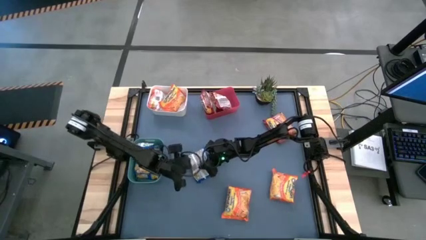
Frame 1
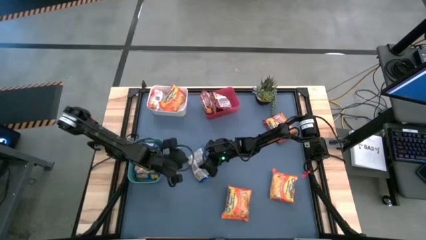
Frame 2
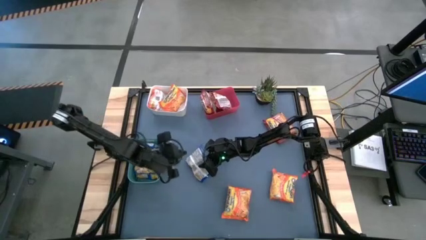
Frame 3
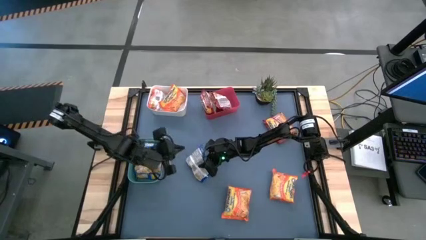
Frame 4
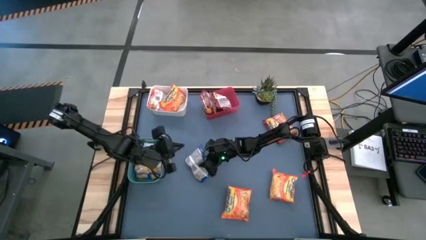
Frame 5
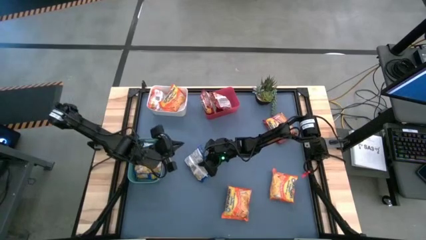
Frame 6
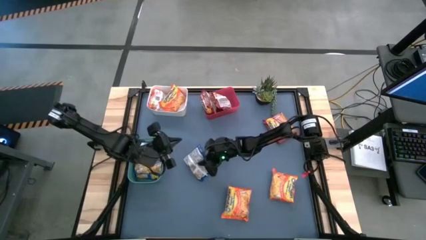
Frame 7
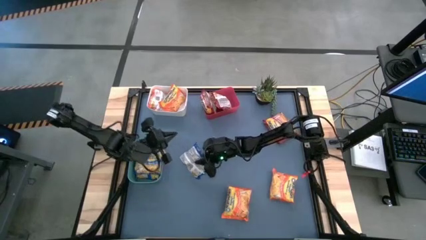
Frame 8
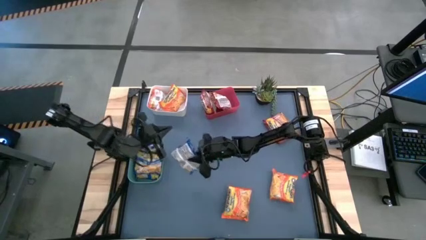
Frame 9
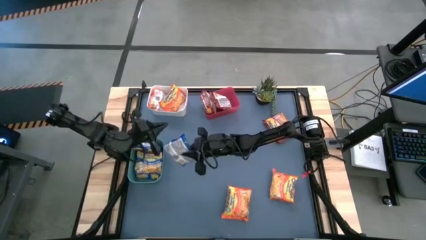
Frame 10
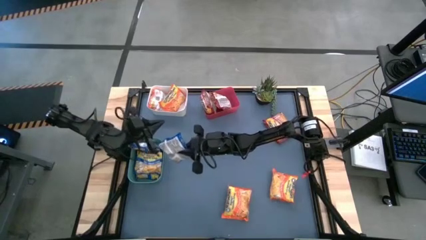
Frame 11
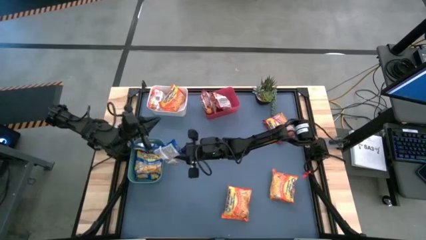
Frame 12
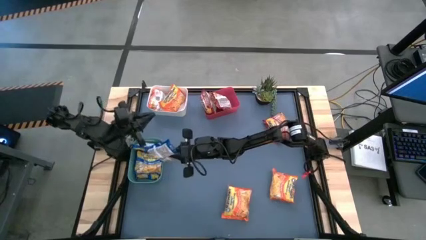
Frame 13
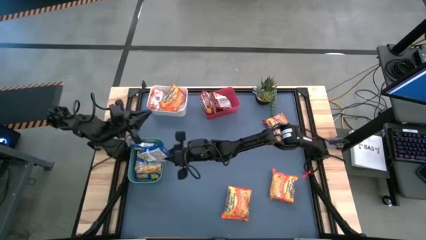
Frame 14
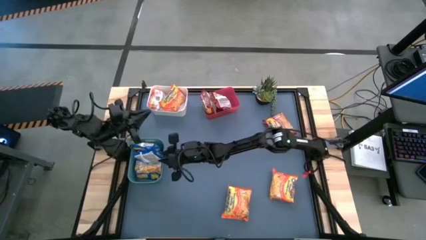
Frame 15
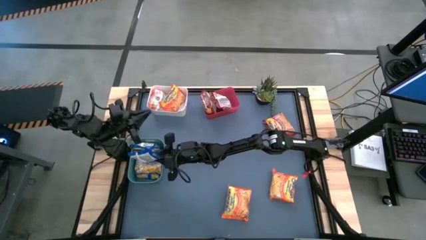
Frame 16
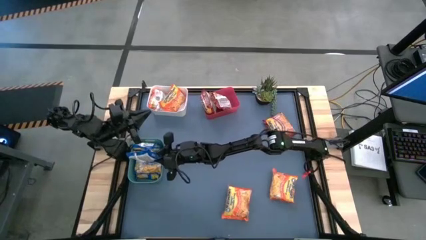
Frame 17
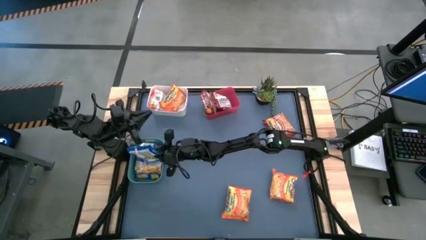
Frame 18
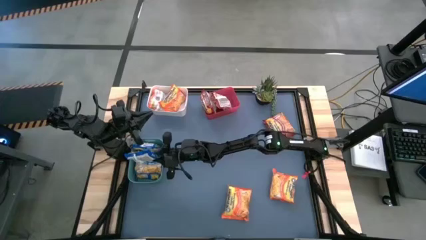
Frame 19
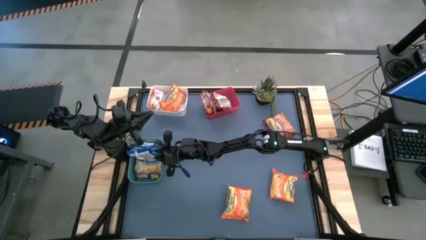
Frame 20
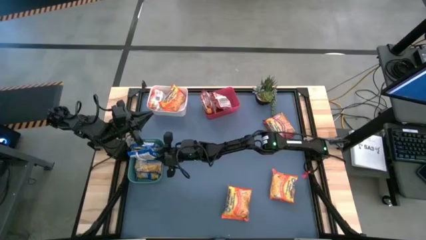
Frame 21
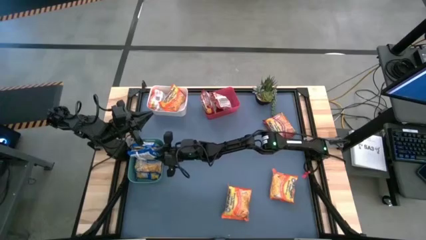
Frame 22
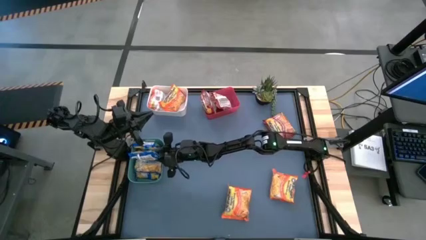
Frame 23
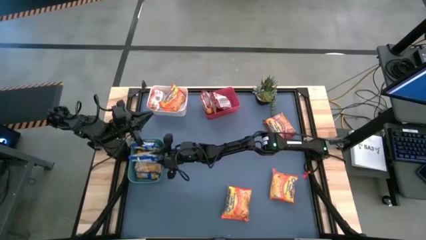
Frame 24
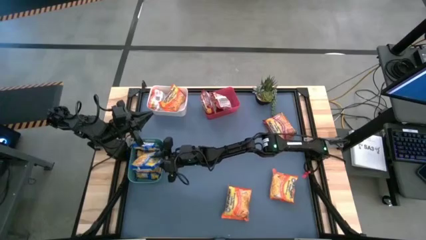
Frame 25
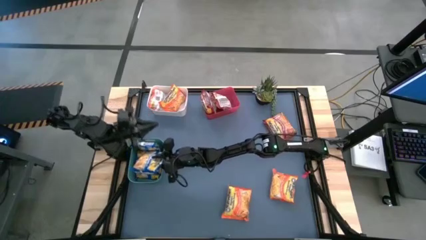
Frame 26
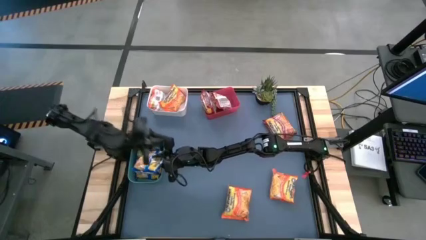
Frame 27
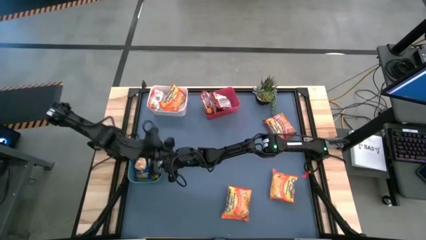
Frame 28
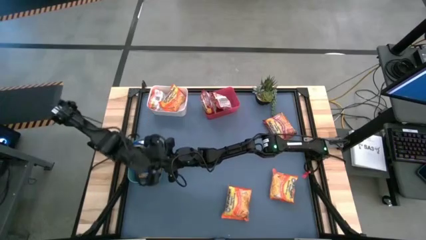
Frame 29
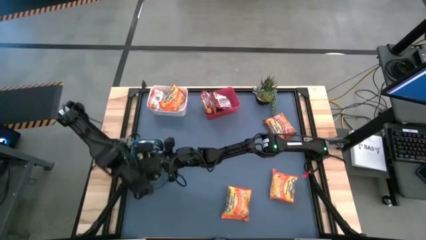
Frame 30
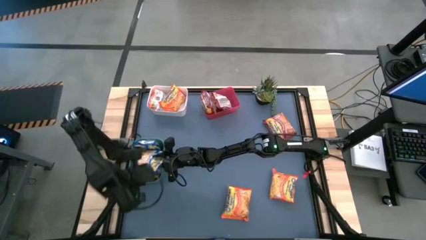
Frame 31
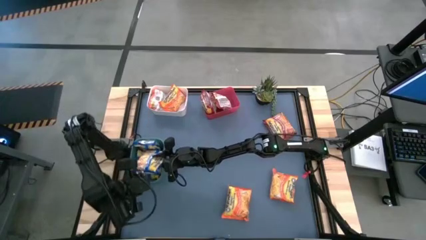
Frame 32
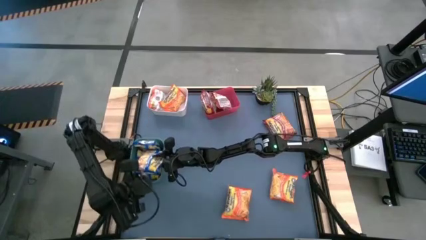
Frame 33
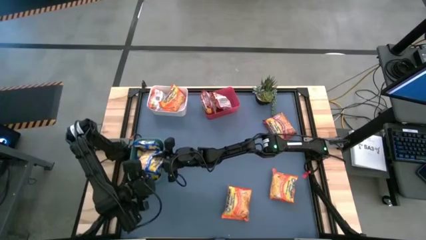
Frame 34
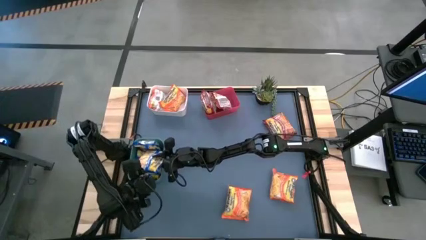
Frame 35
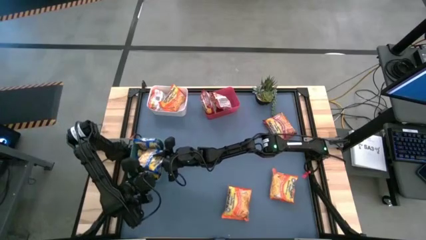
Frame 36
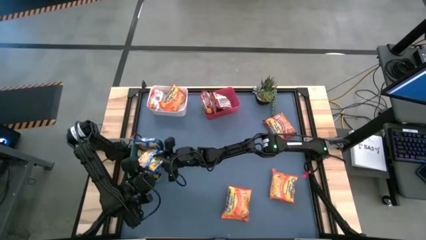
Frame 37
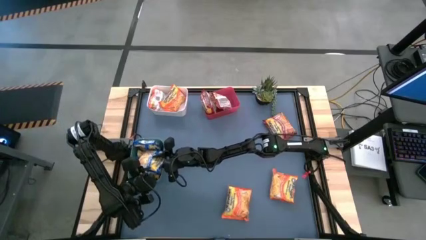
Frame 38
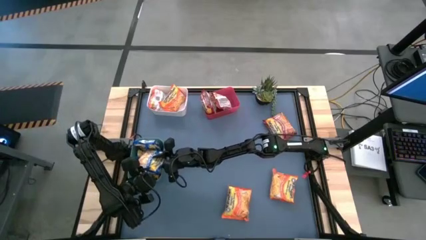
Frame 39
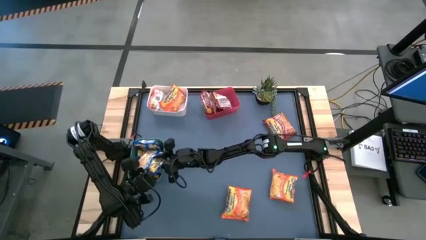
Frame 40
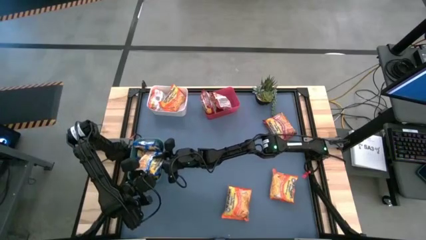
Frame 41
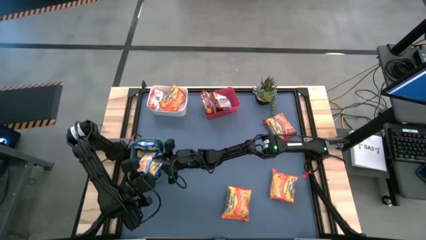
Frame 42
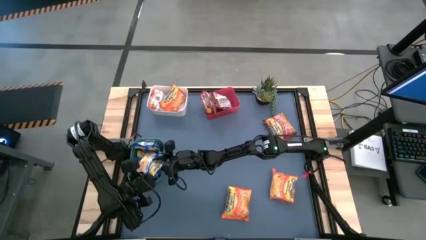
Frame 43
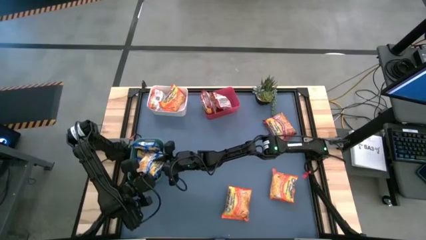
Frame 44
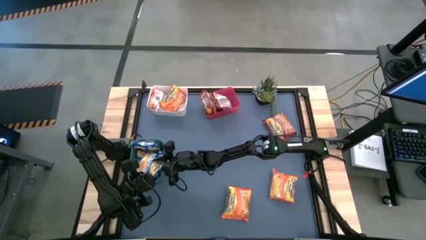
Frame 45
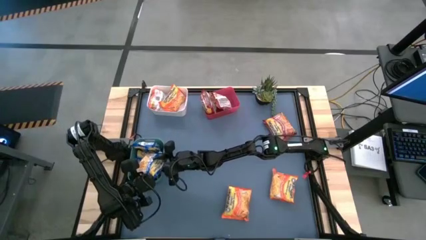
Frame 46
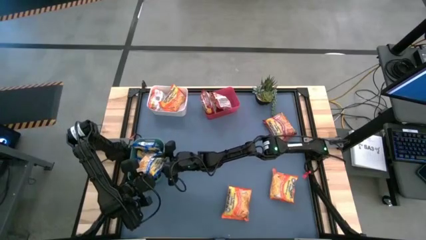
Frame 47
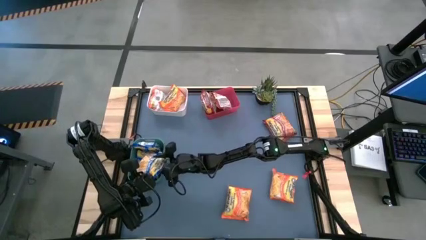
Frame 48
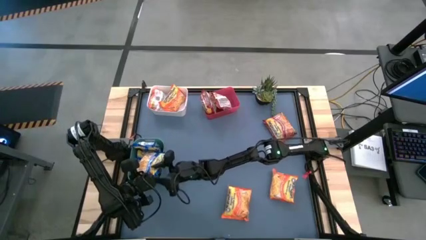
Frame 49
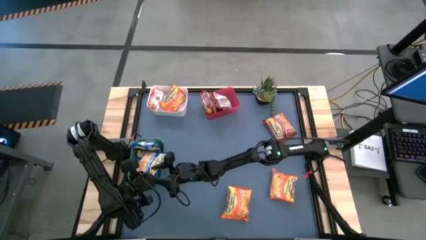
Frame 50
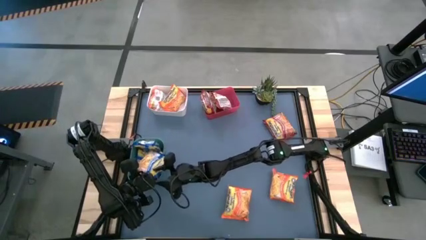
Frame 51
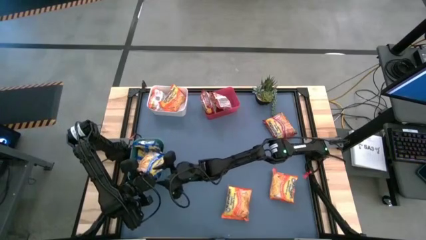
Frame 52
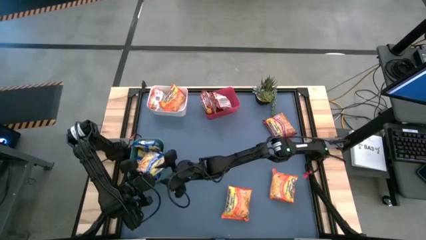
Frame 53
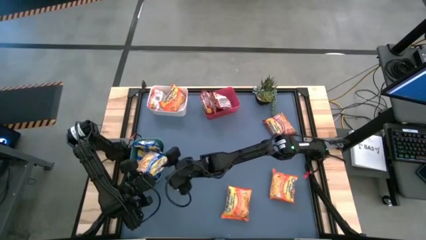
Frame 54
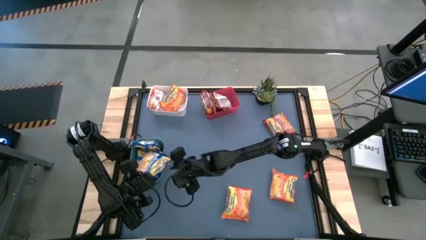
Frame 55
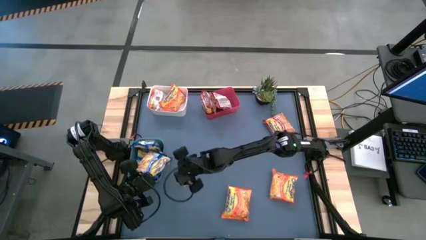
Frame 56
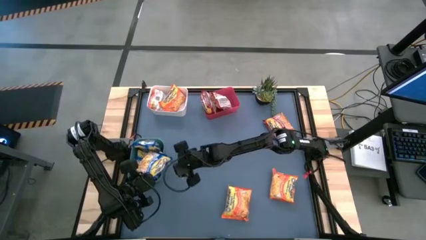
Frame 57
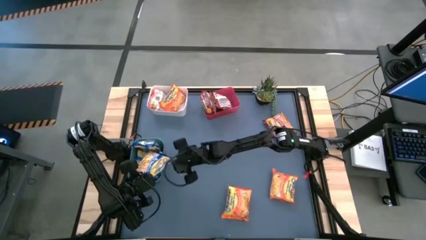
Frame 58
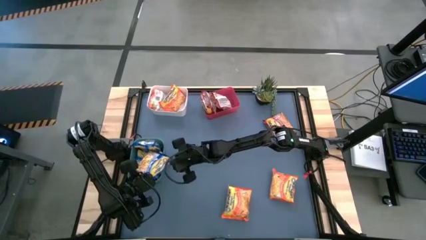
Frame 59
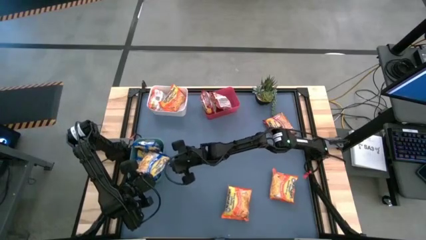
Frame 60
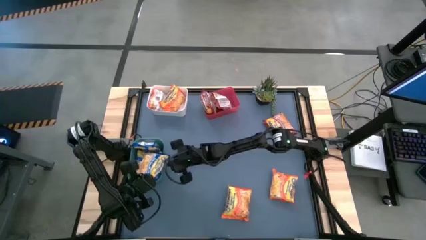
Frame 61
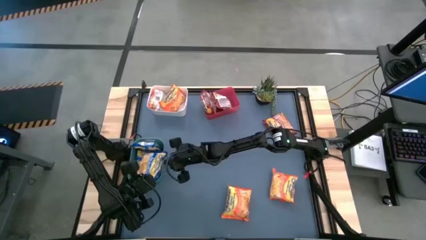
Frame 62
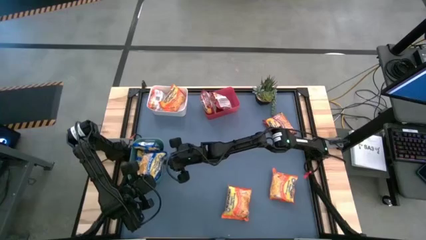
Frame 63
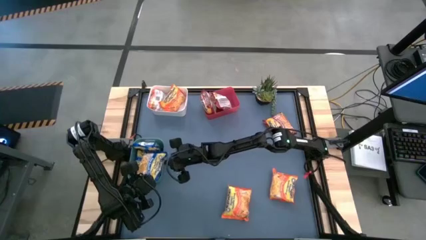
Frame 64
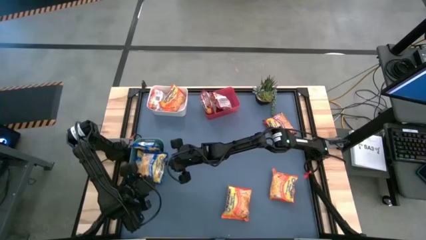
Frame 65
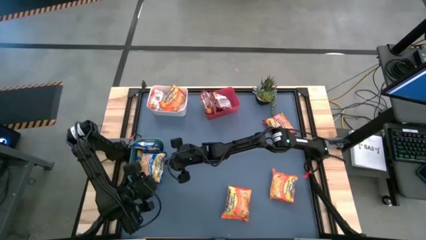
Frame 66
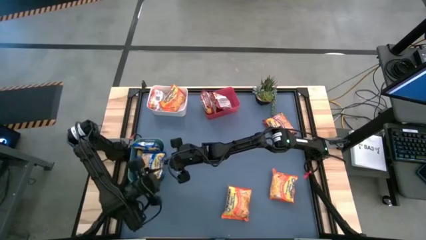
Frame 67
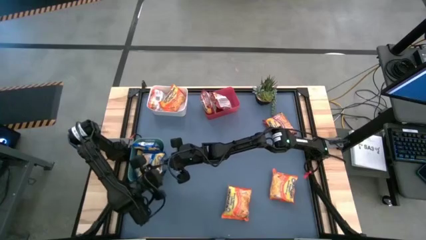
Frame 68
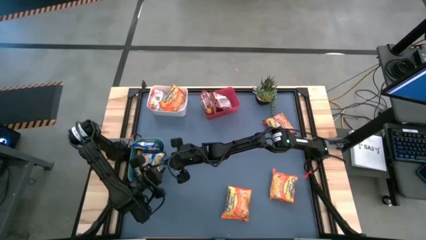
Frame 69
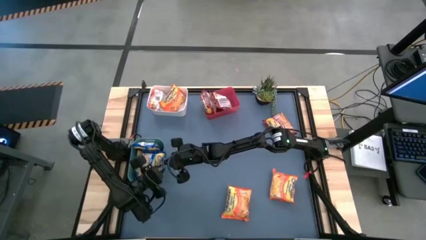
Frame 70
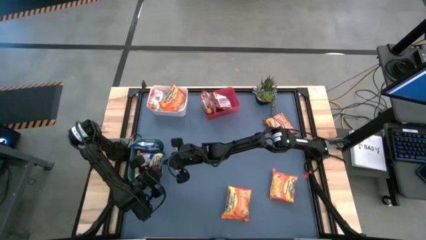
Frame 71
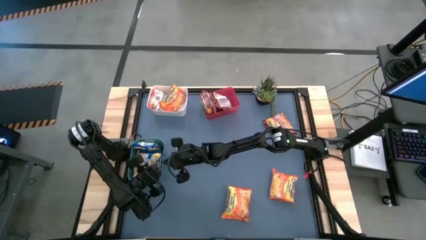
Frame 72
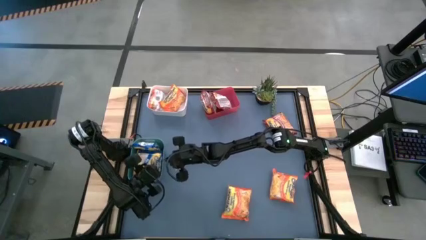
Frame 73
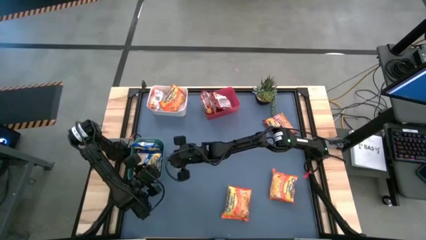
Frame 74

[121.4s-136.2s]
Task: Sort Maruchan noodles
Stack the blue noodle pack on top of the blue noodle pack
